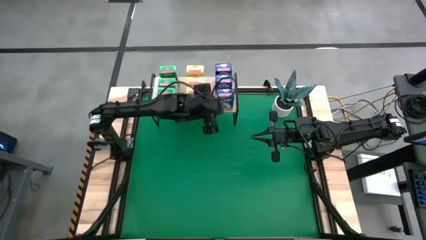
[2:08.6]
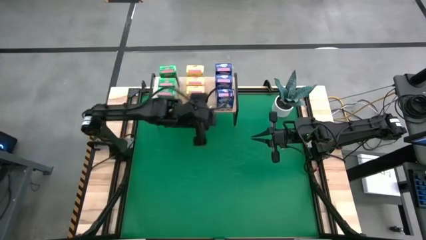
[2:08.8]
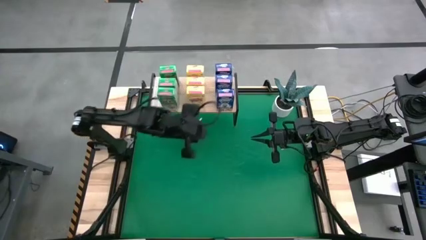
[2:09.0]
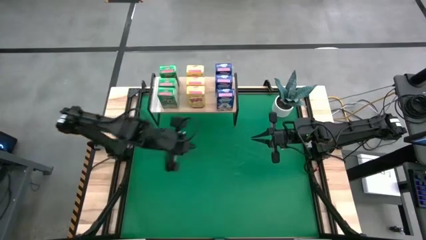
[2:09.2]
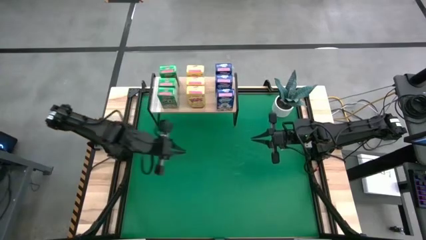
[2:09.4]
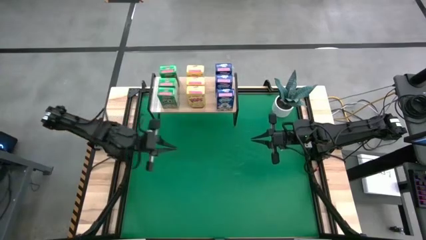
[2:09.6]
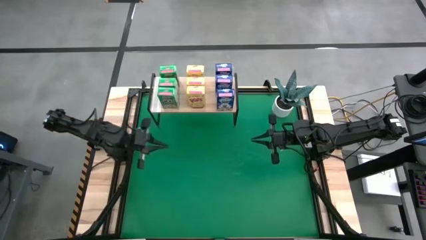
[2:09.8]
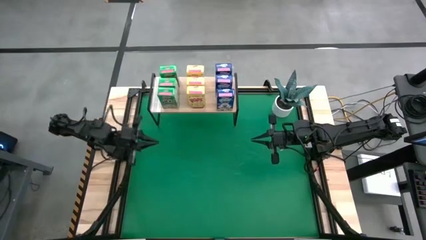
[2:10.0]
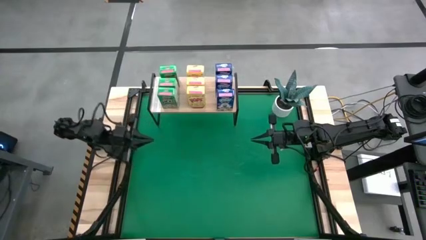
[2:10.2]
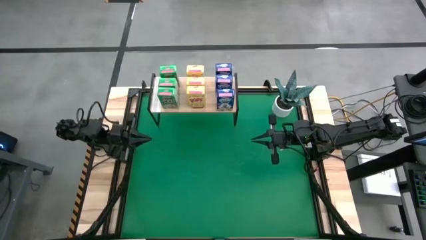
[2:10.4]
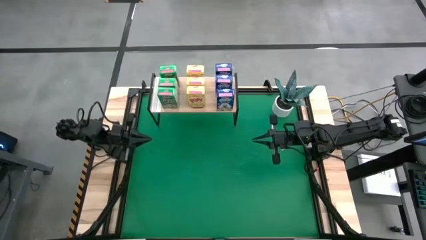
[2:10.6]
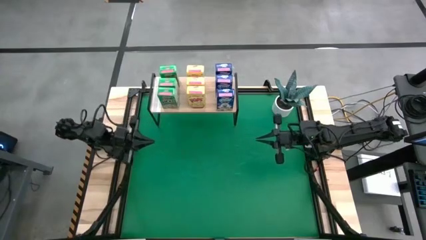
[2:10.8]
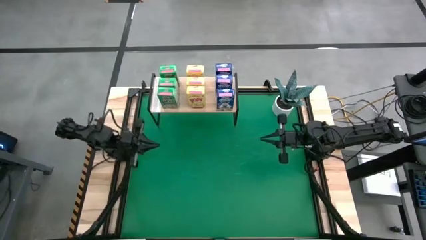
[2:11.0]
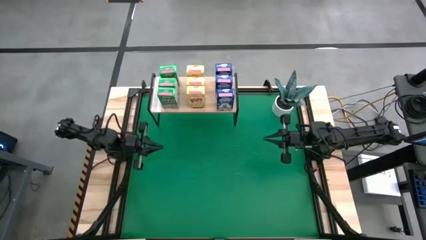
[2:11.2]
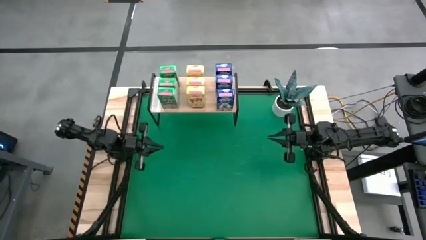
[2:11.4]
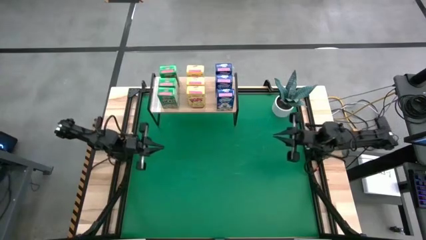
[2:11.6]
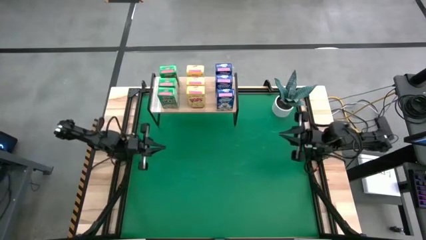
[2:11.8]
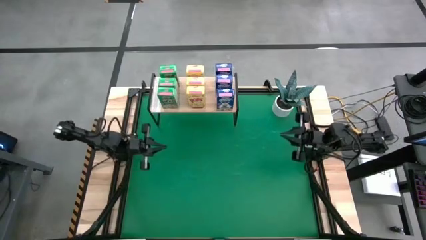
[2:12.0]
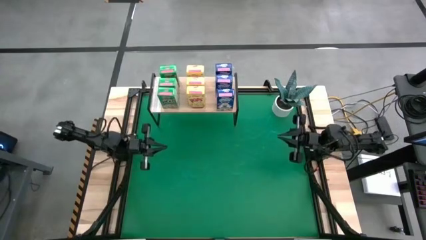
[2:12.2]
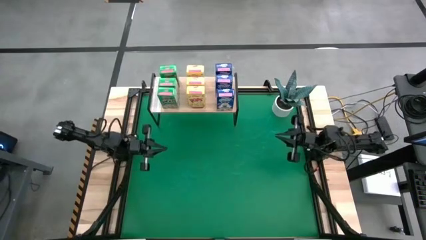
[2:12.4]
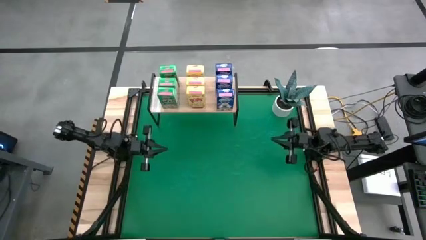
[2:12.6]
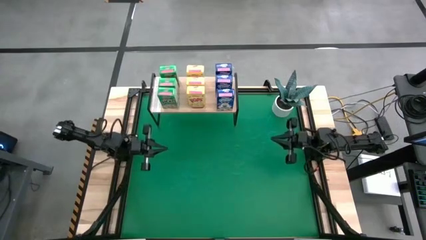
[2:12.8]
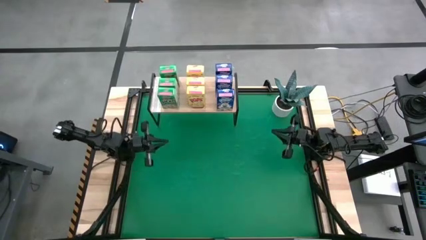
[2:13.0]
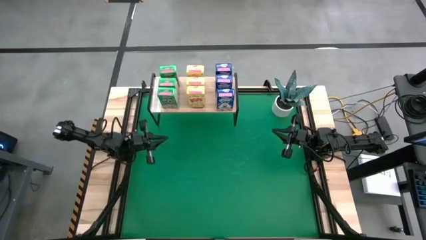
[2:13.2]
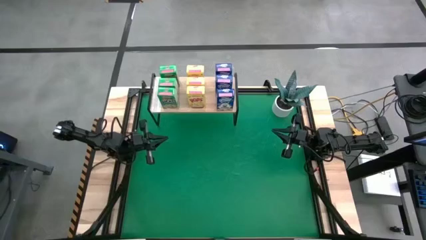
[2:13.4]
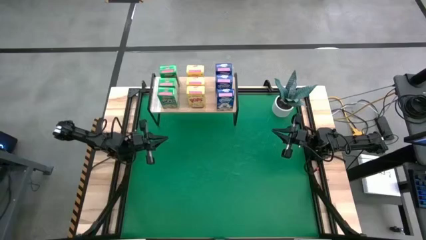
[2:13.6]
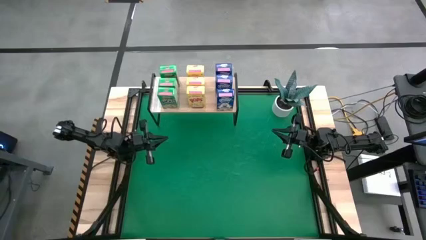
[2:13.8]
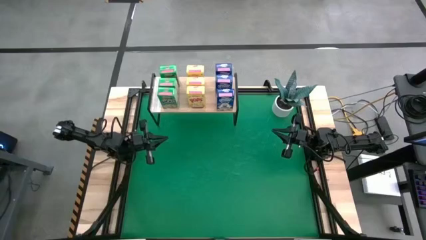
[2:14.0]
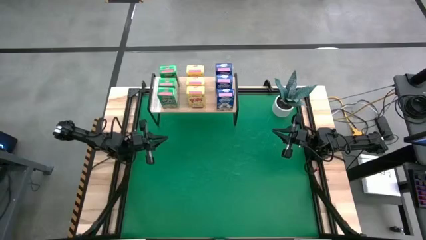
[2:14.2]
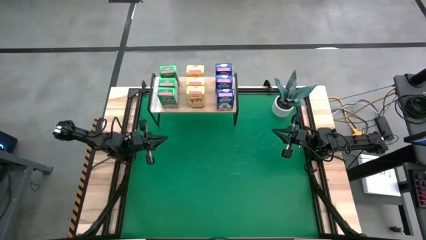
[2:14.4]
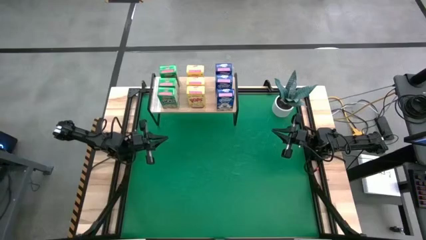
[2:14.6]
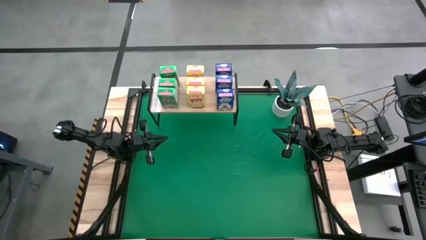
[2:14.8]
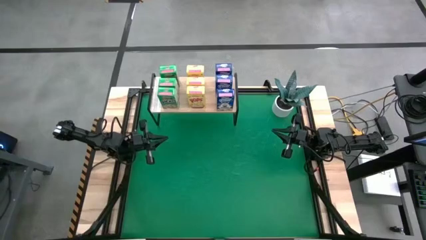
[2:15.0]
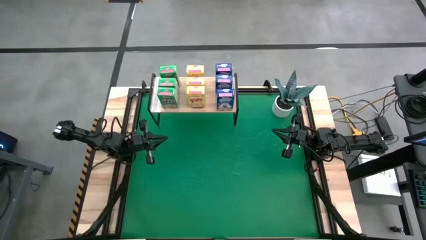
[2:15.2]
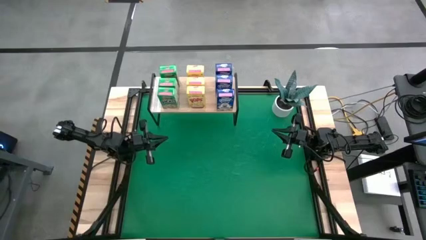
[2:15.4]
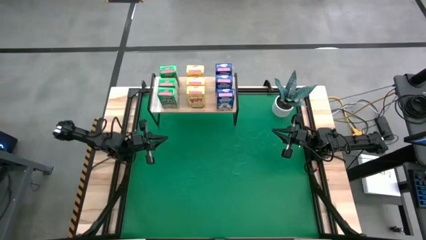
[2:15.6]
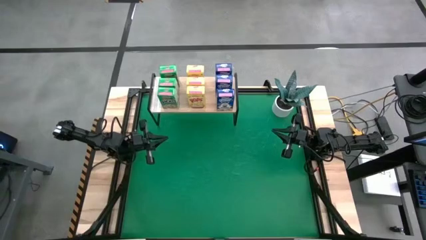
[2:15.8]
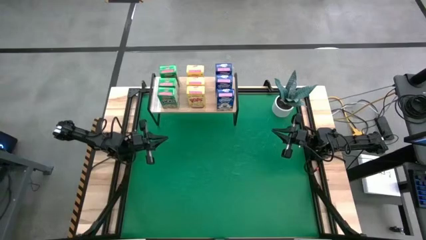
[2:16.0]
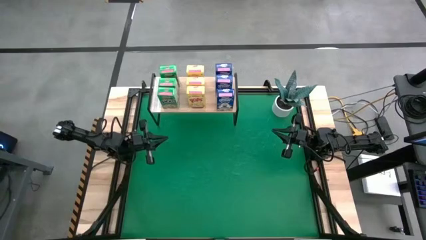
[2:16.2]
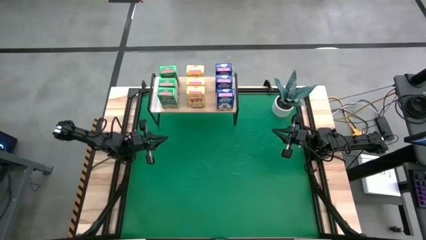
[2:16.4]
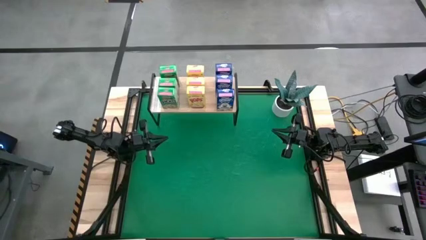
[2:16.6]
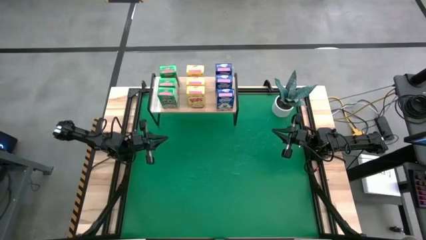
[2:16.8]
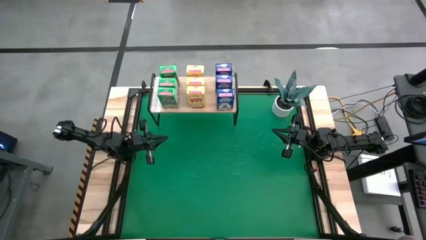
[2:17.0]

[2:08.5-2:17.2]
Task: Stack cereal on shelf
Return to Home Position

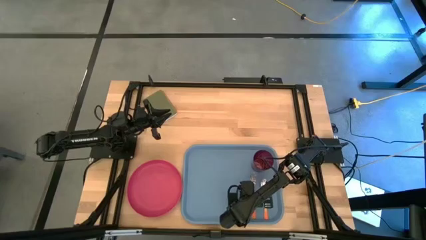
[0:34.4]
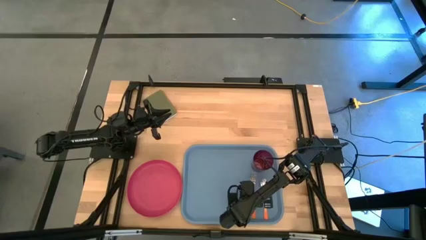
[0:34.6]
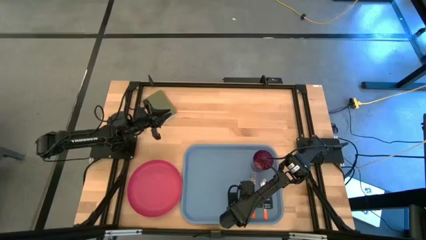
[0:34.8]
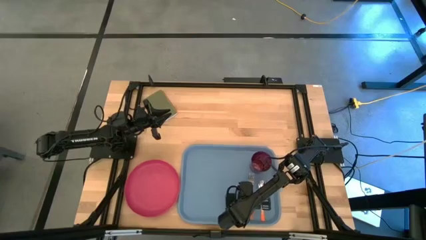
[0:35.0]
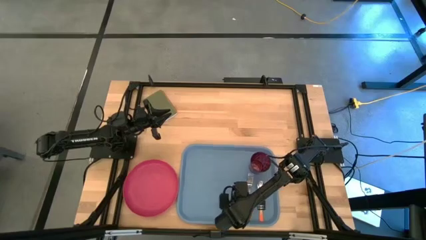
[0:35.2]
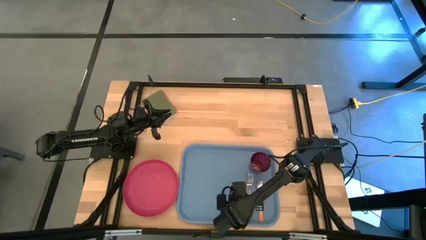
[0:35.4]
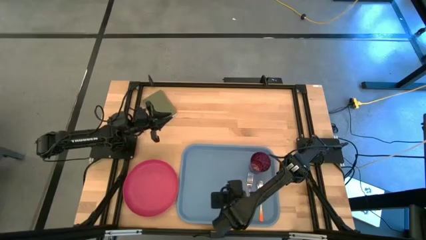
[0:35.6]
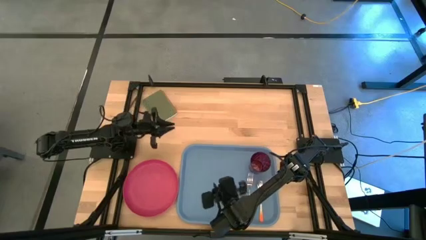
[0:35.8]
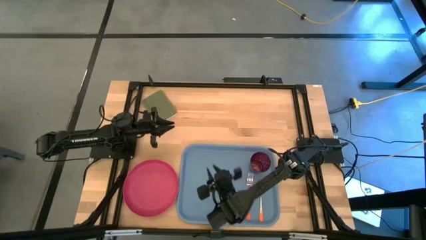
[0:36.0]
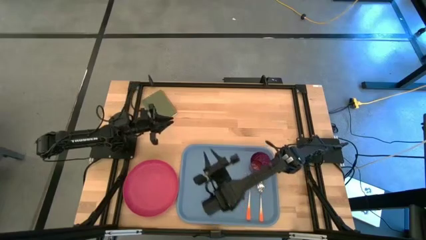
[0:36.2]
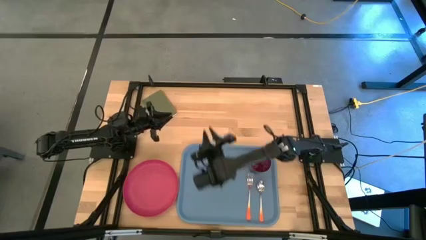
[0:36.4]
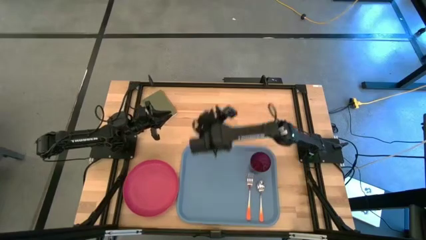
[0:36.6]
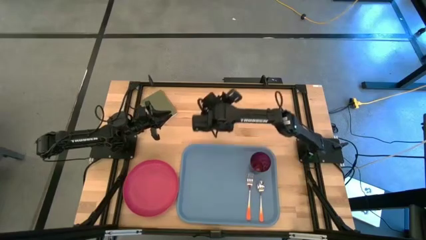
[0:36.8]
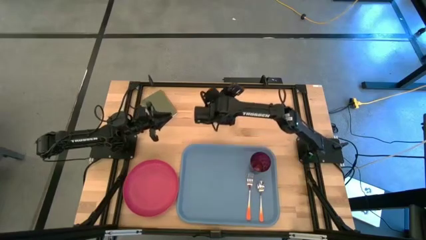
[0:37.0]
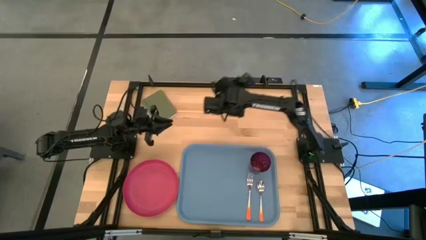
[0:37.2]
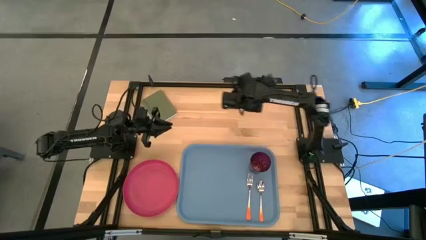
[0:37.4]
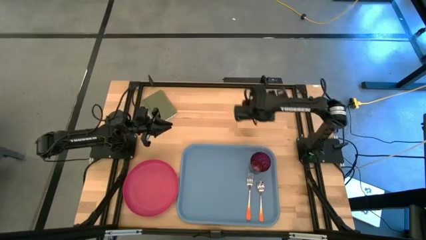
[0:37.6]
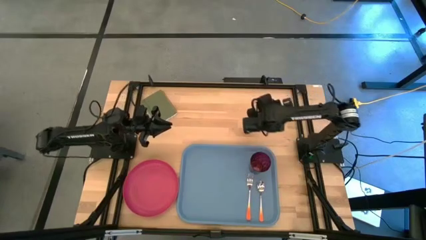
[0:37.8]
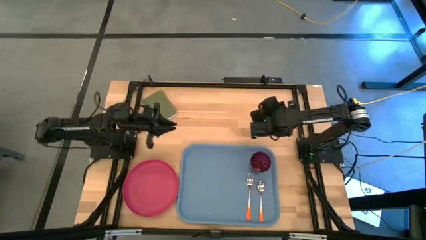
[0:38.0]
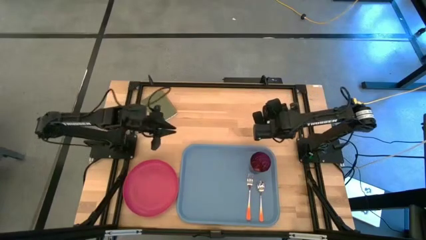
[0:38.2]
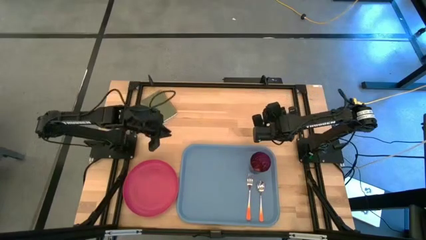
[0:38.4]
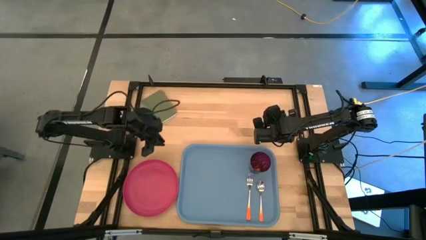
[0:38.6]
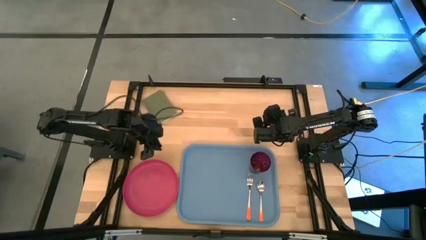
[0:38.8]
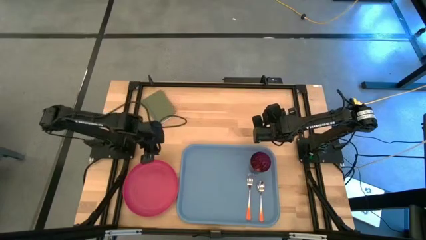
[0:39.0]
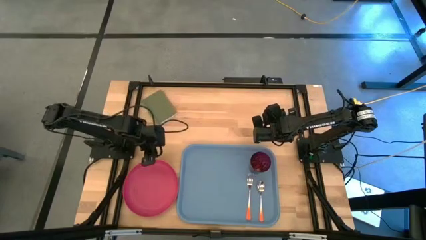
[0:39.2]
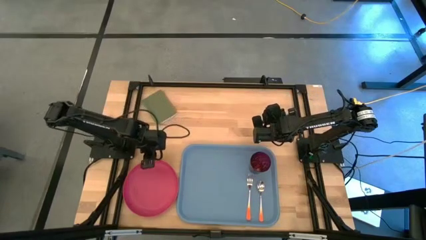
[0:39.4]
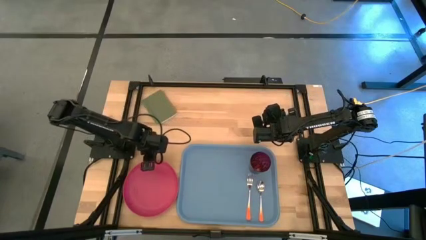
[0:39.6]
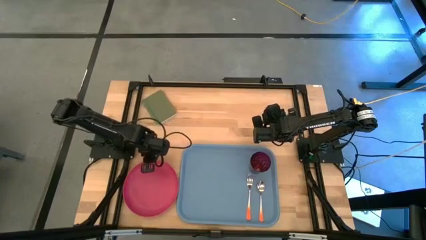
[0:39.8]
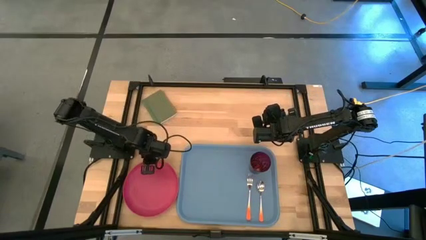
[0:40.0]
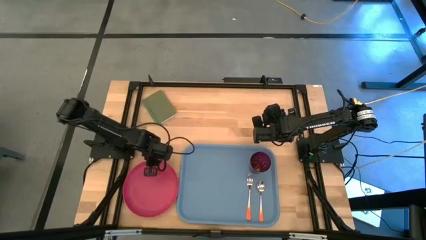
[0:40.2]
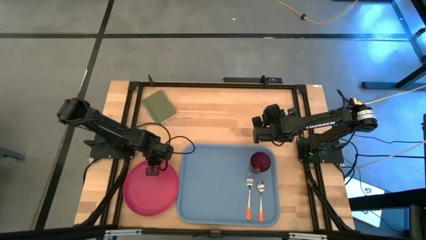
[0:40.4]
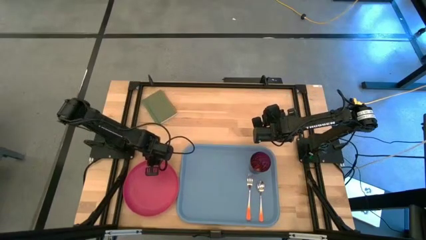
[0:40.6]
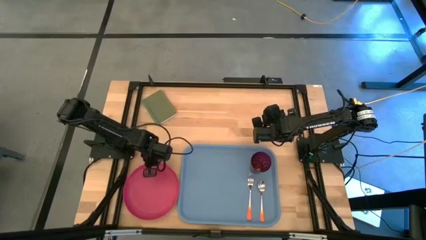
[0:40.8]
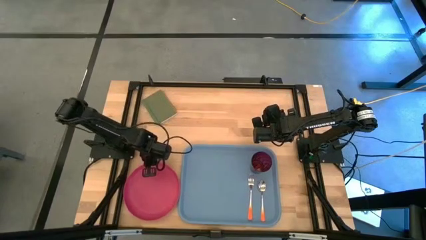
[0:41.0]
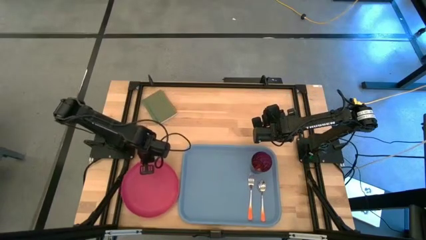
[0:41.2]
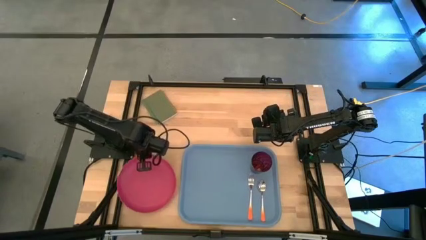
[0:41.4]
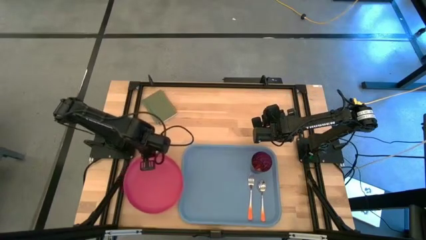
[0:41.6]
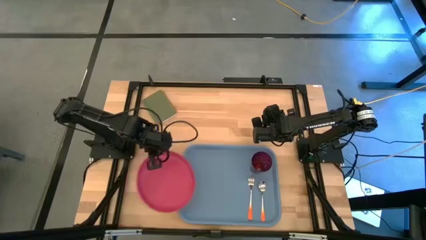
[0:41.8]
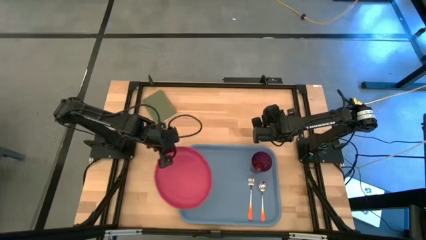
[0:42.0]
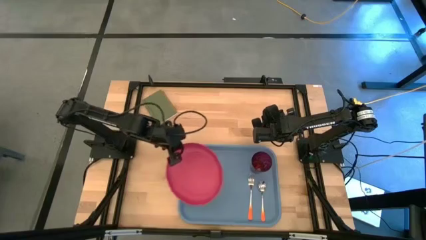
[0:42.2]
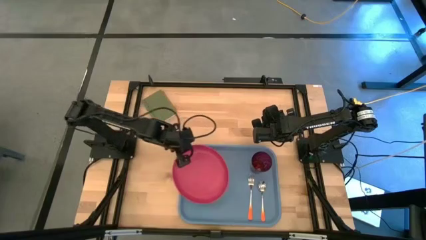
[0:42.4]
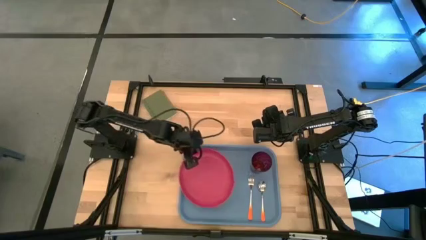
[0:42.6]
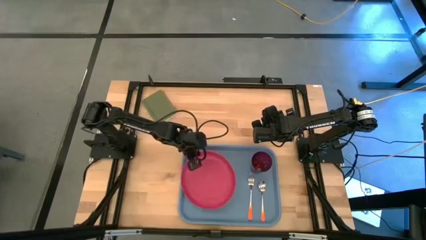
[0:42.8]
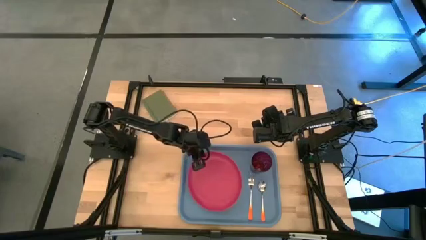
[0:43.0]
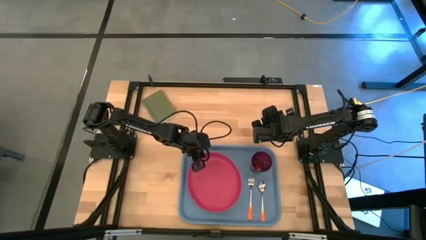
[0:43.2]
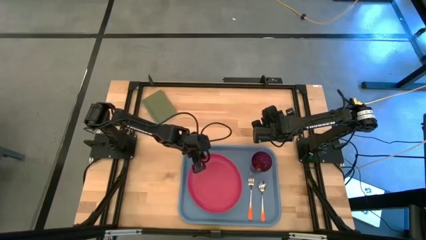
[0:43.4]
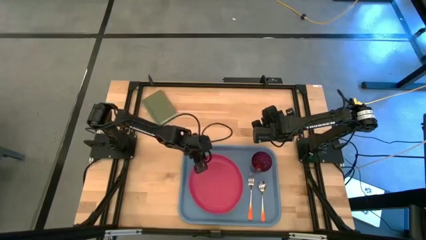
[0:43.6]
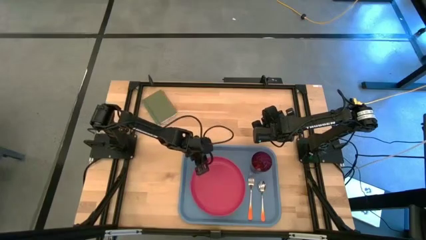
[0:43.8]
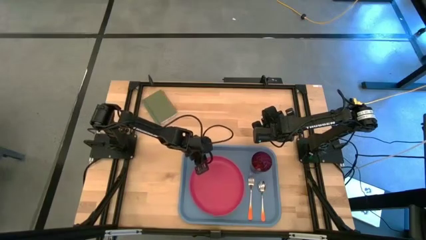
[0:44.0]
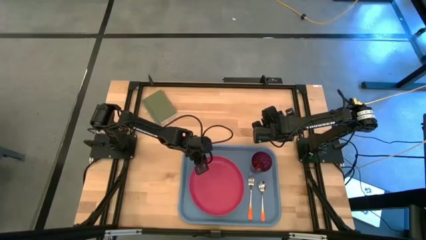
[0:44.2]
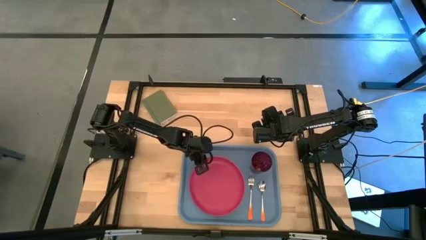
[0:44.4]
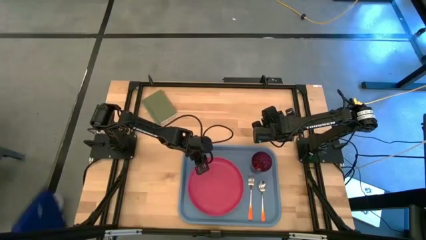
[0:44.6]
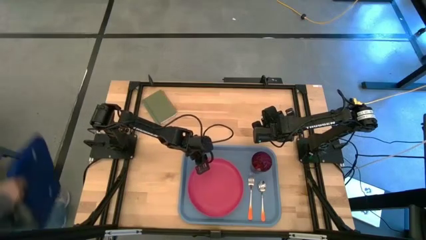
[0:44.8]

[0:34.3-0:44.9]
Task: Pick and place plate/cup/fork/spoon on tray
Put the pink plate on the blue serving tray to the left of the orange fork
